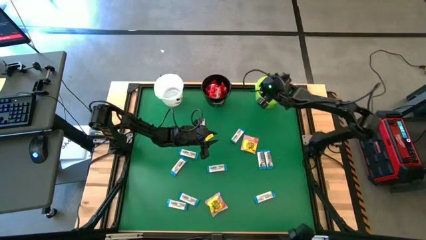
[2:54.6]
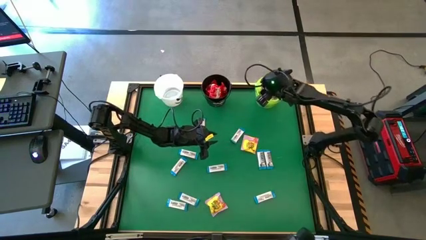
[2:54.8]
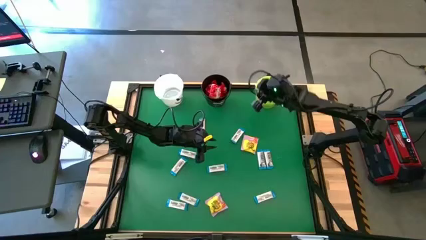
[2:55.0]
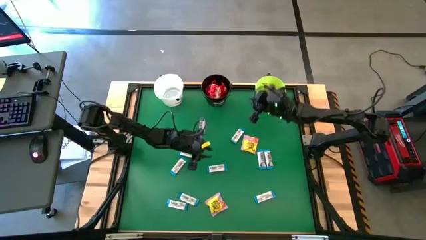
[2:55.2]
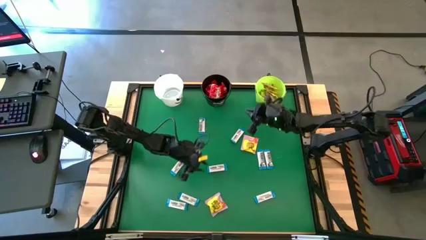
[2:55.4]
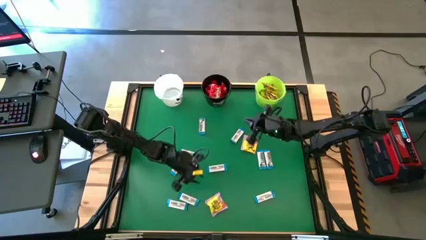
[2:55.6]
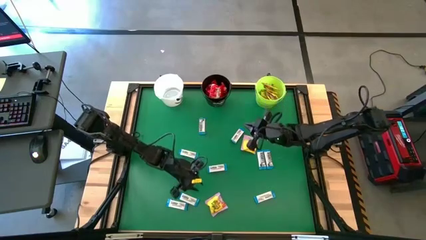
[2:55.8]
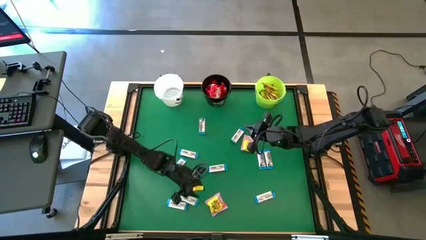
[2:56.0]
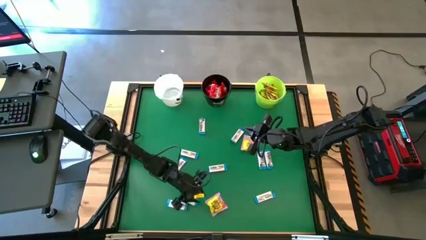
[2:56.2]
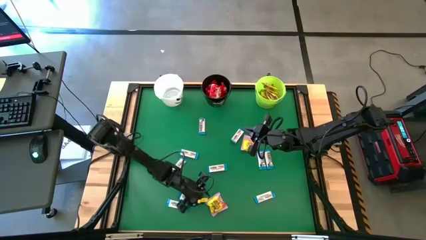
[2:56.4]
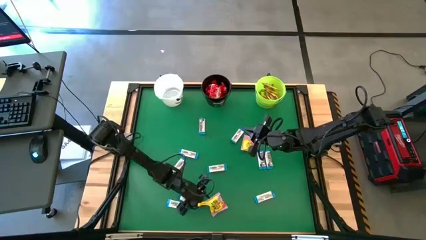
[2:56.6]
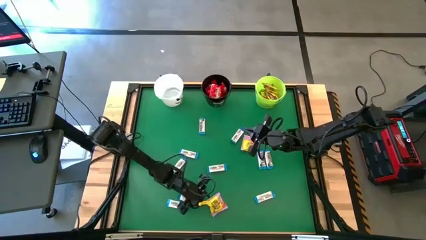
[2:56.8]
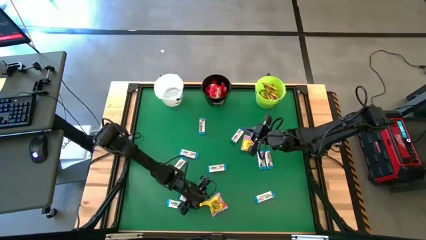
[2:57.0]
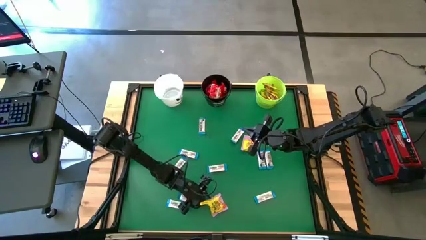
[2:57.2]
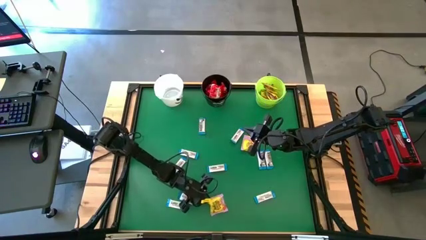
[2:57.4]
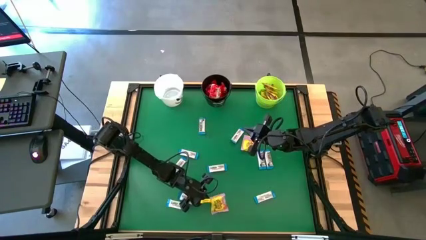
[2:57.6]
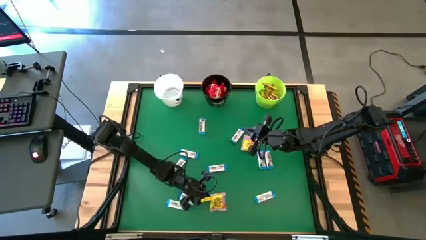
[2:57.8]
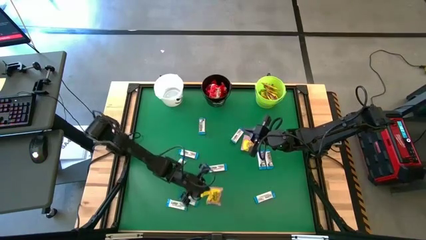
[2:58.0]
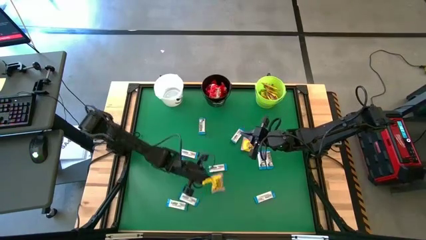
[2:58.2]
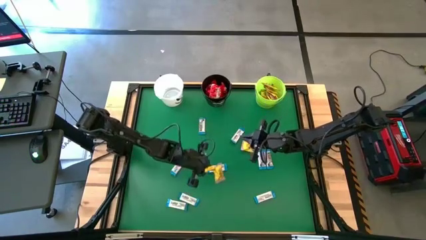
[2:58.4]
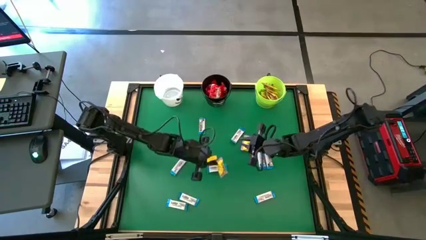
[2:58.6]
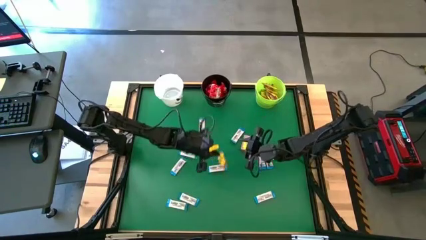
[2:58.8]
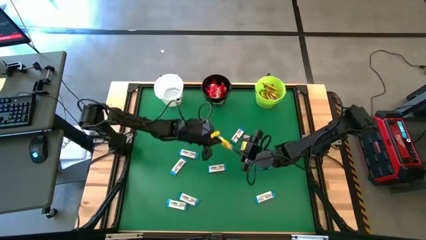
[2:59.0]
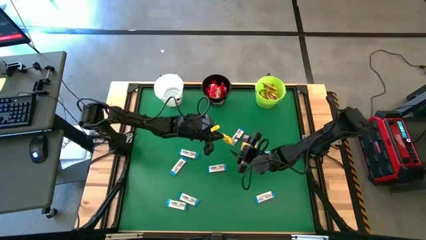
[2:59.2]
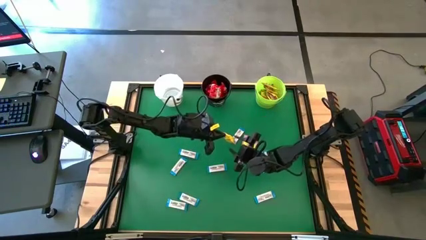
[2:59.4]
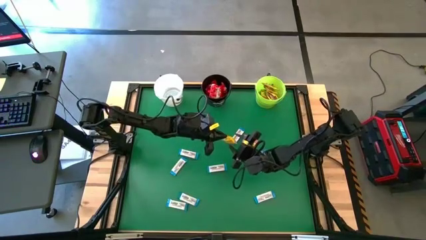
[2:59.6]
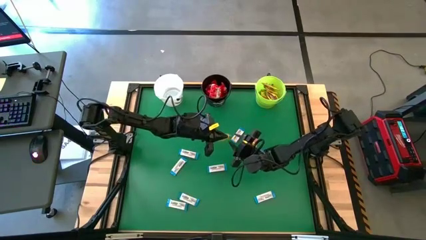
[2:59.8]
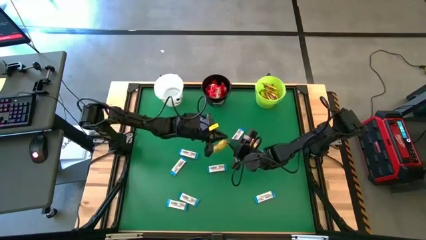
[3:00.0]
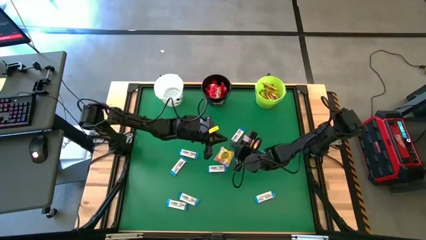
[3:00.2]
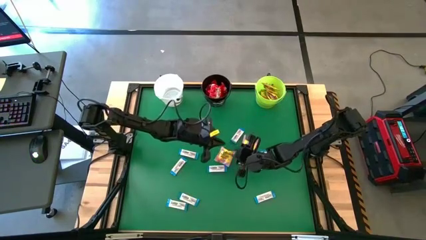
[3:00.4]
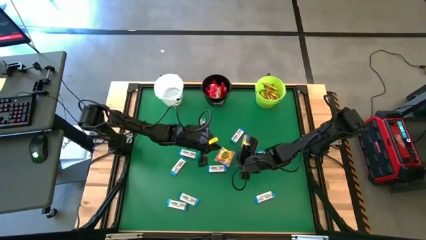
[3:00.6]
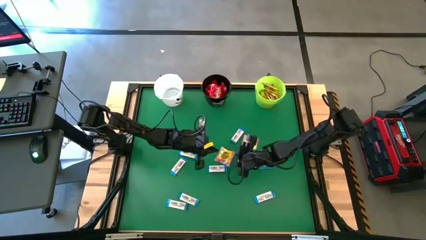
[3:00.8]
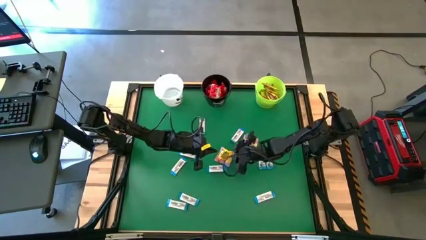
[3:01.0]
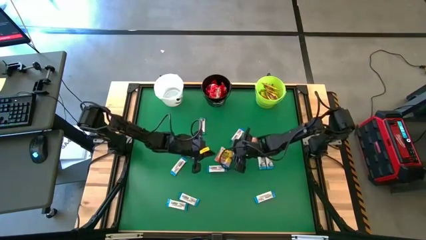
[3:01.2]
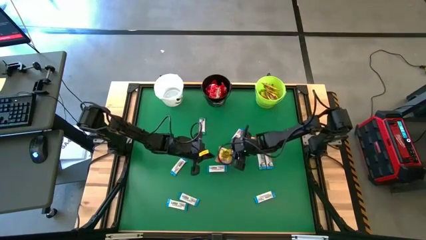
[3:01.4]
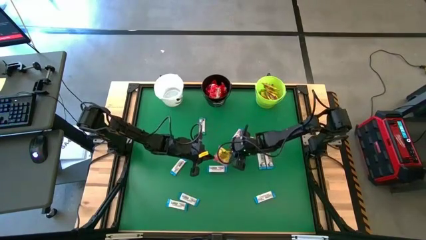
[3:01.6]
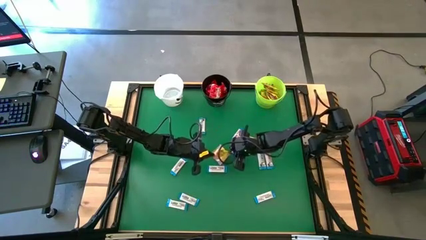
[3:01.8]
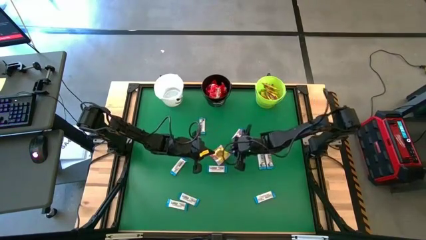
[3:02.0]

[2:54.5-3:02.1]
Task: Sort candy by brand, put in halloween buckets
Put the yellow candy into the green bucket

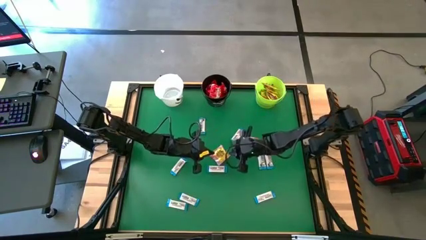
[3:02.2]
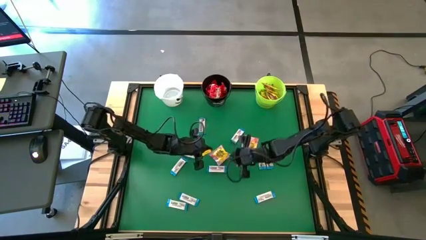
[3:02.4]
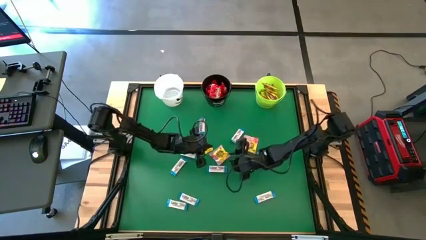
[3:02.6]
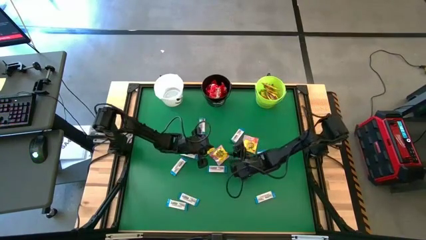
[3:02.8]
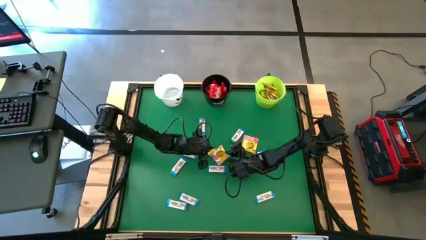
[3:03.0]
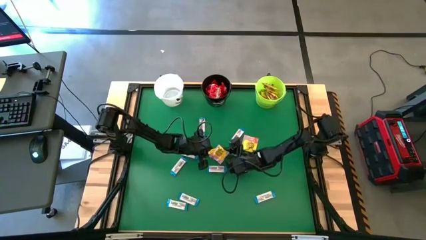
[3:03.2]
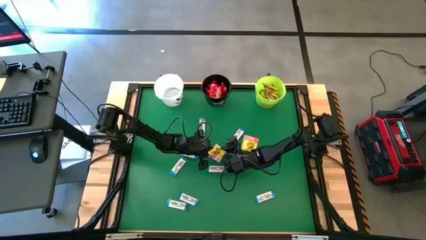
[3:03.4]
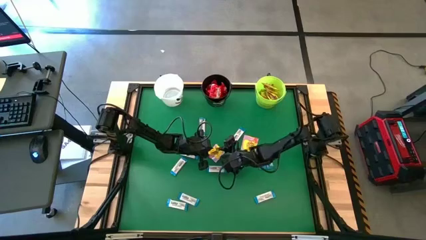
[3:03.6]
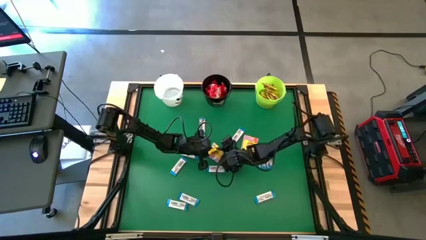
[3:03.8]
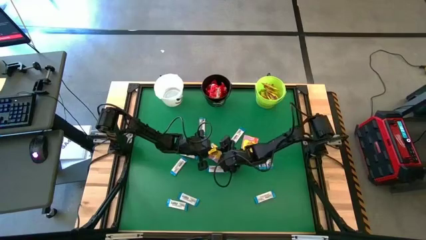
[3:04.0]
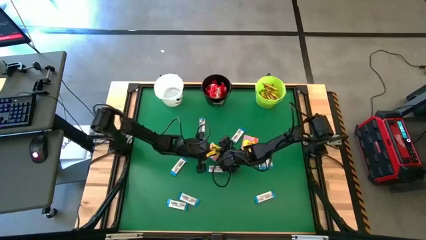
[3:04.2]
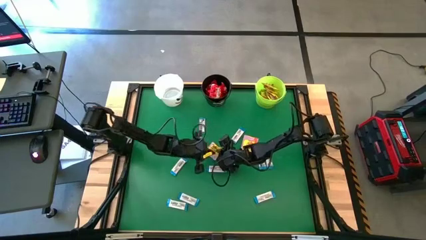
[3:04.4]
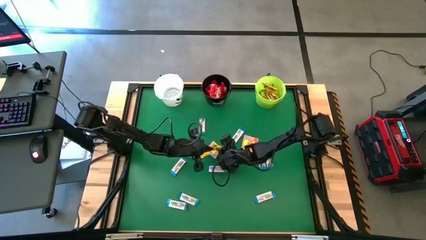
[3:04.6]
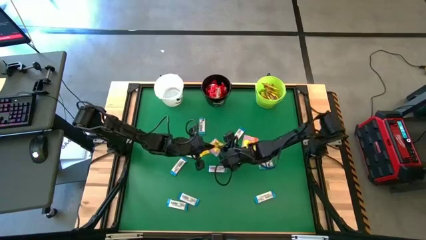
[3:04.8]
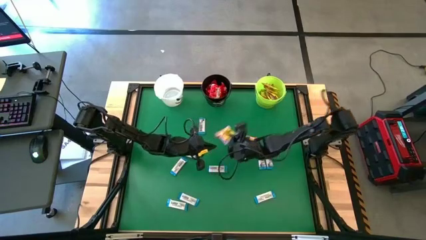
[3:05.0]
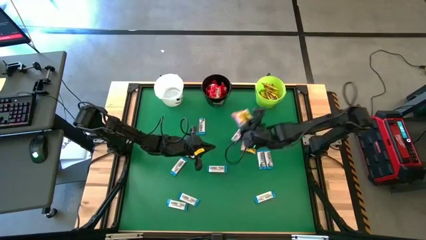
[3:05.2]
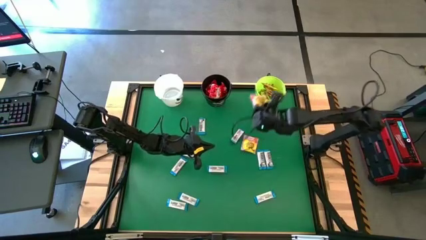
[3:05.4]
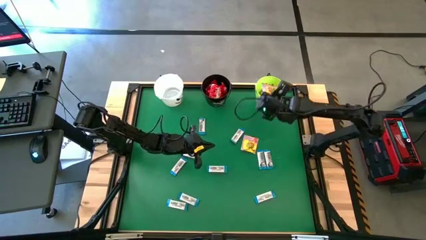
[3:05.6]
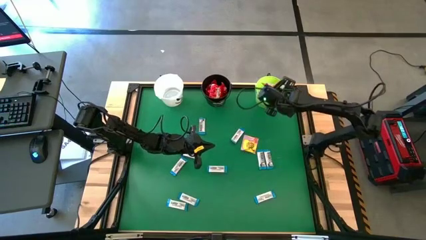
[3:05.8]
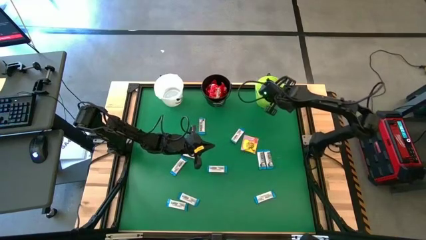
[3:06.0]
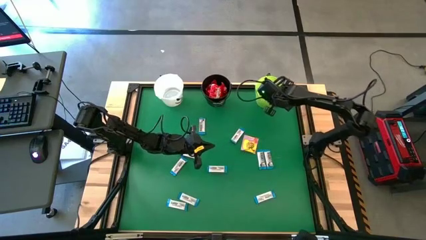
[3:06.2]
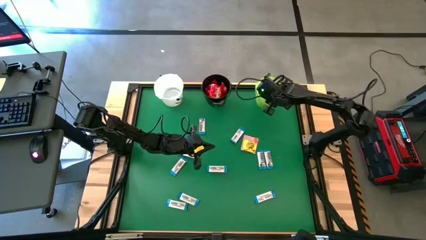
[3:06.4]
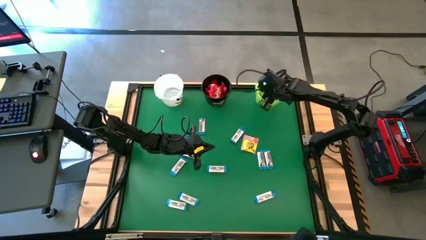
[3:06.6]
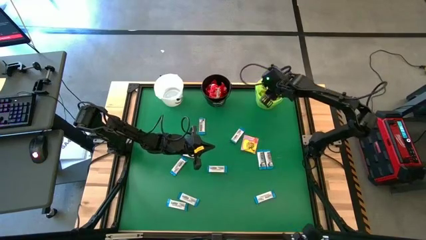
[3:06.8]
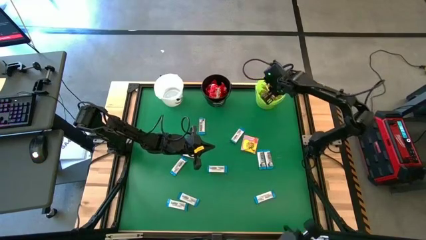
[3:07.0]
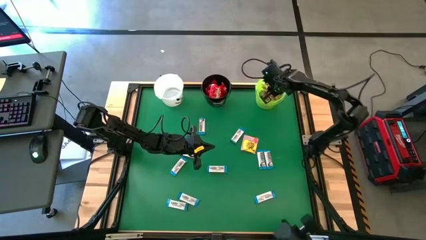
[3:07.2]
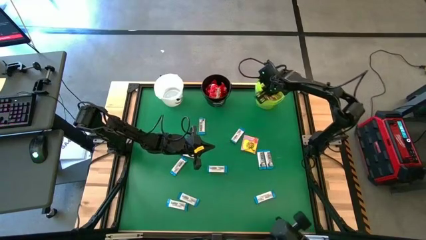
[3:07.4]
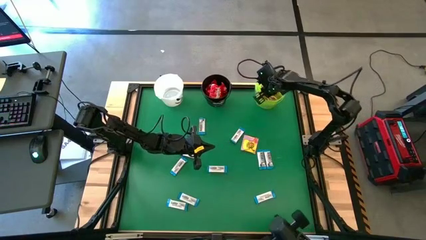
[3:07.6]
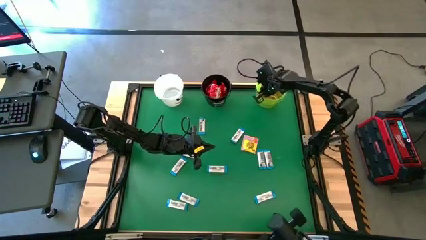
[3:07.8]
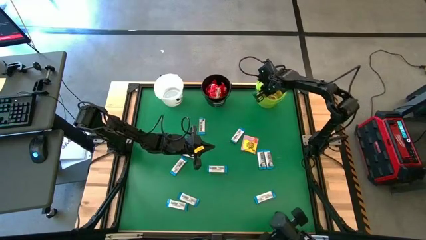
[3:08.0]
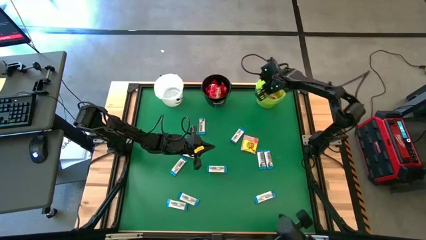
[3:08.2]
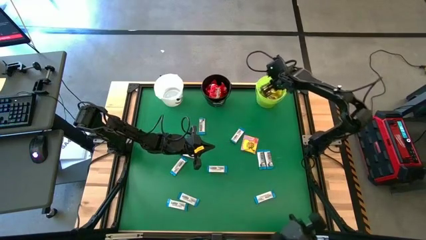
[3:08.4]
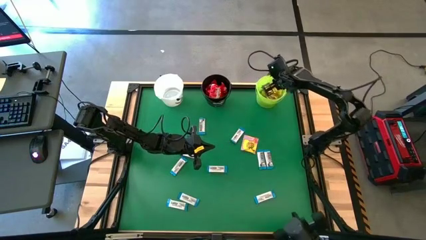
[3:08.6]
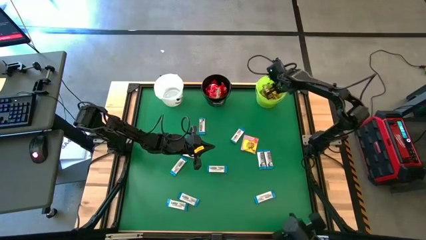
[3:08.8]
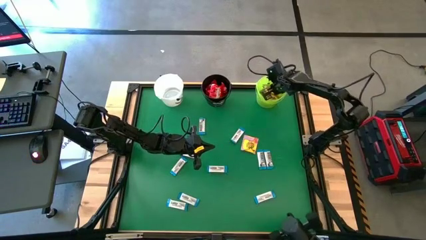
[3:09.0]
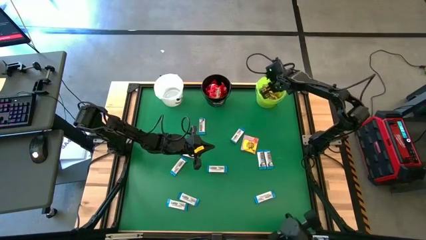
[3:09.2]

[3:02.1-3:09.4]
Put the yellow candy into the green bucket

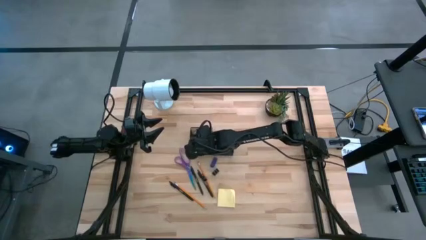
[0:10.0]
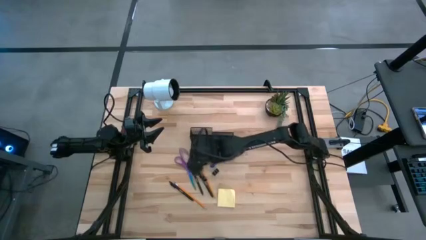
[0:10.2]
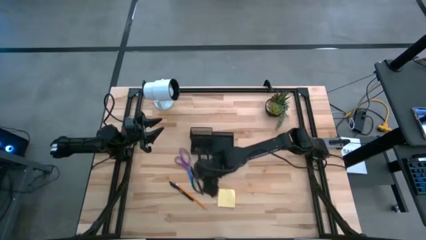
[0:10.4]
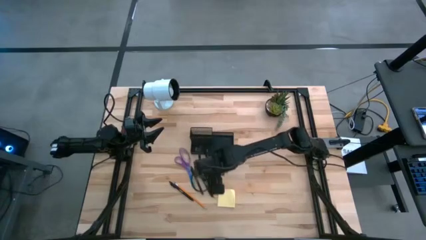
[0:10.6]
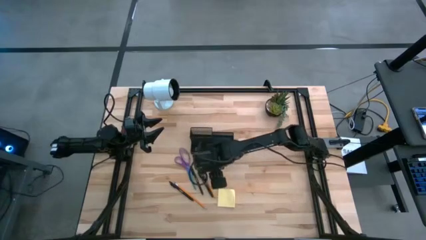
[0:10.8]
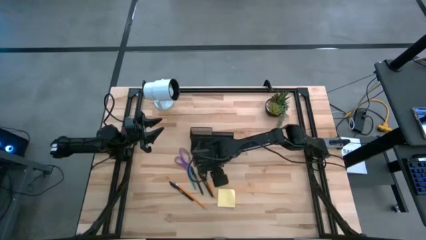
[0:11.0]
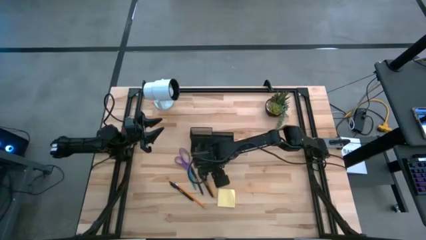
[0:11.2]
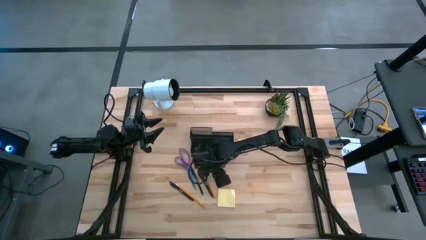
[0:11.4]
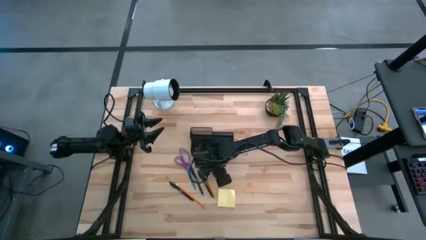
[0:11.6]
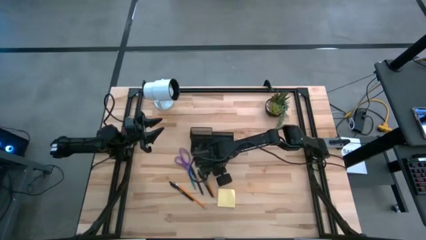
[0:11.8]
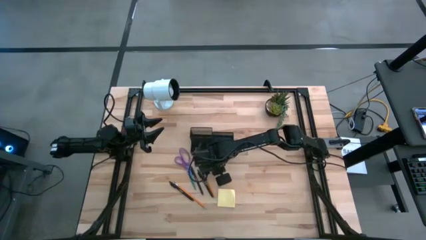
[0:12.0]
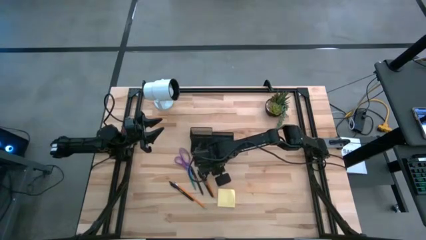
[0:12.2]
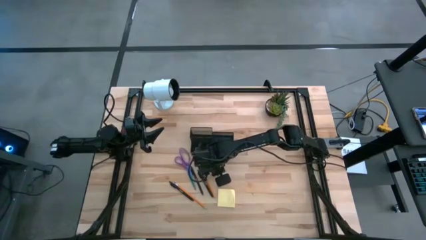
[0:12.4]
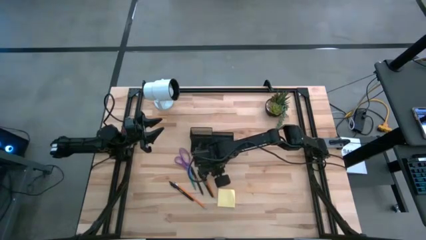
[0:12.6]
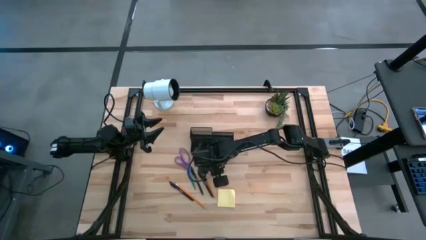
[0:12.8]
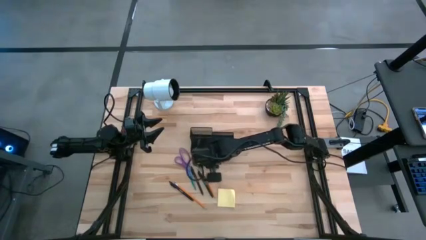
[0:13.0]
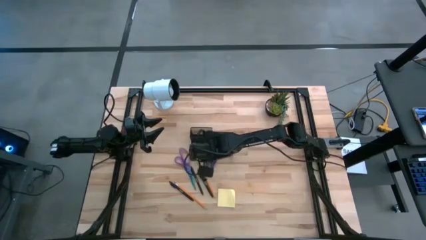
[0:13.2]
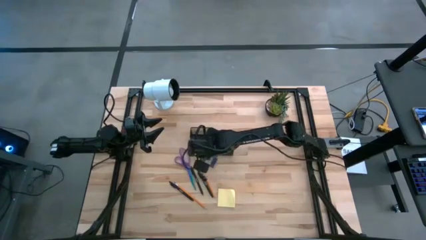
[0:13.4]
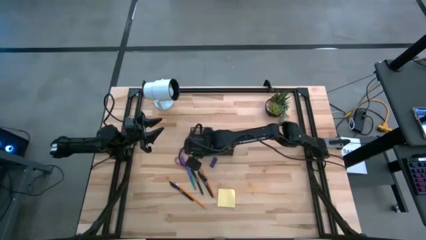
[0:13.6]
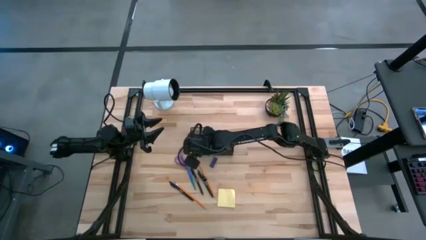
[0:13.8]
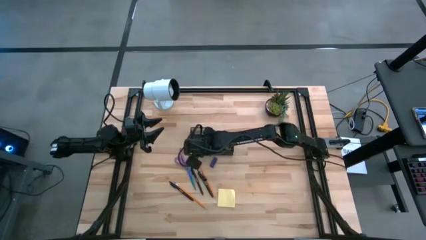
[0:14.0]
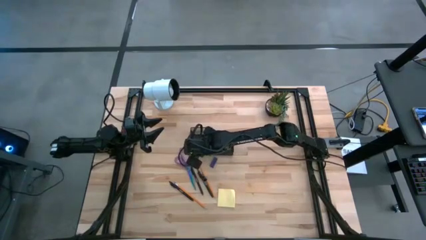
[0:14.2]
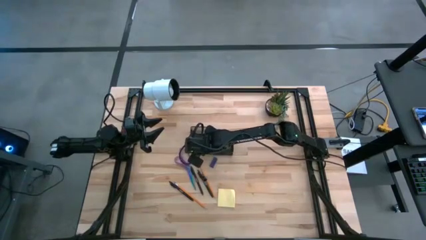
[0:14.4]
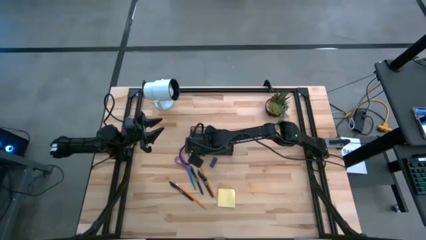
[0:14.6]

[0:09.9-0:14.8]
Task: Pick and place office supplies into organizer
Put the right black binder clip into the black desk organizer
